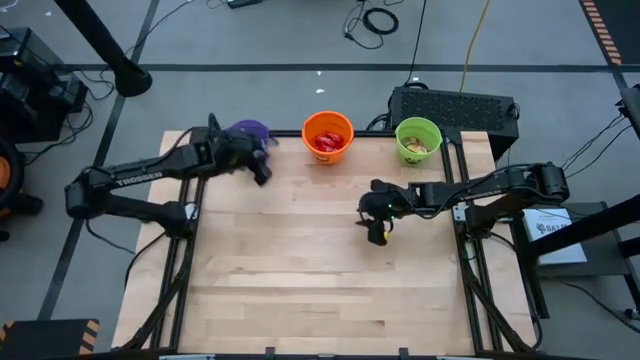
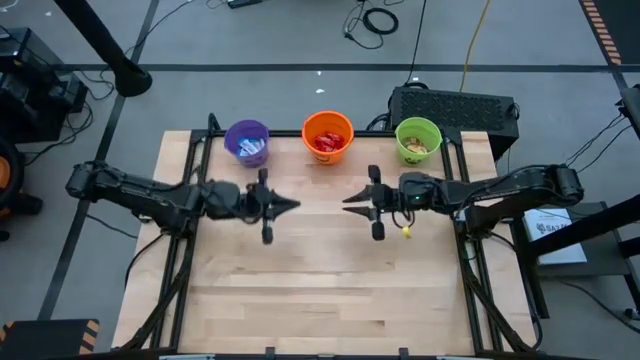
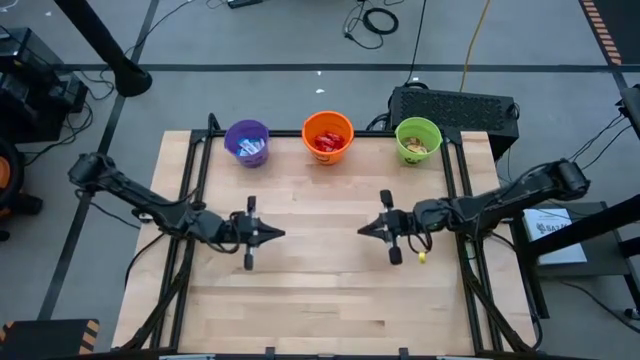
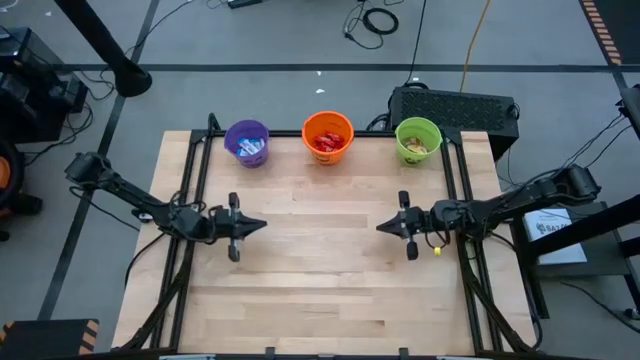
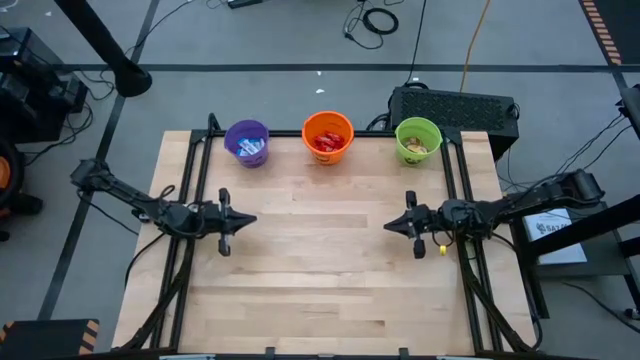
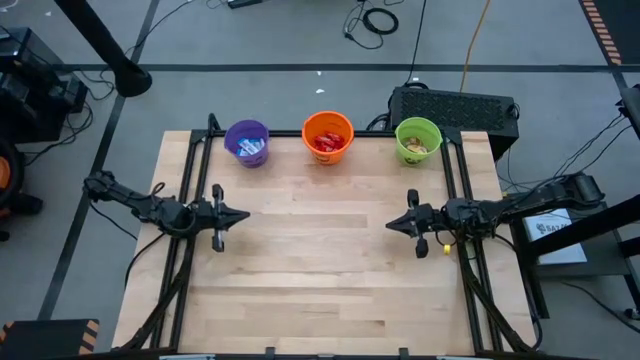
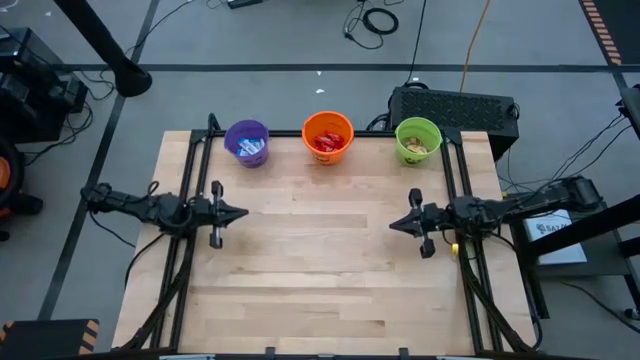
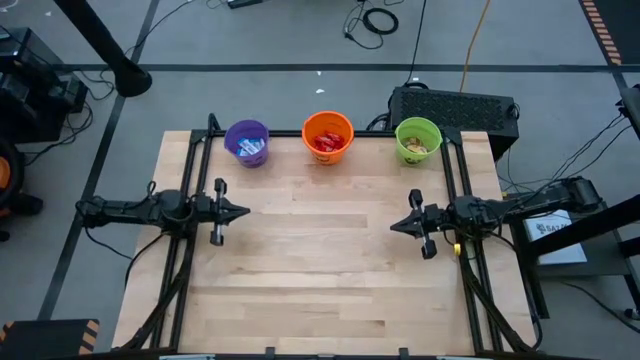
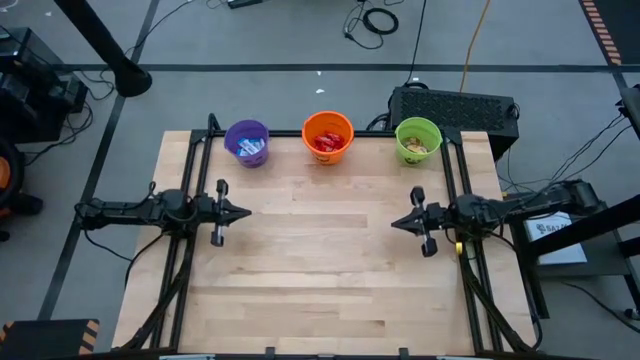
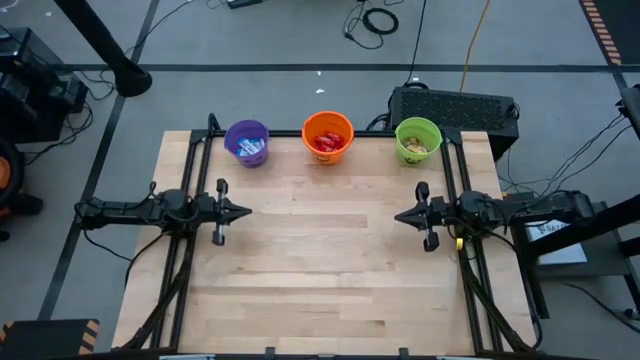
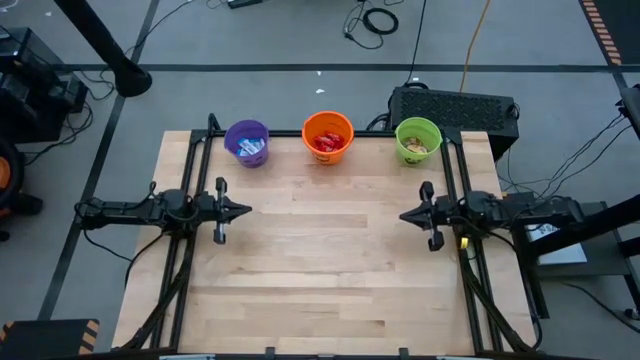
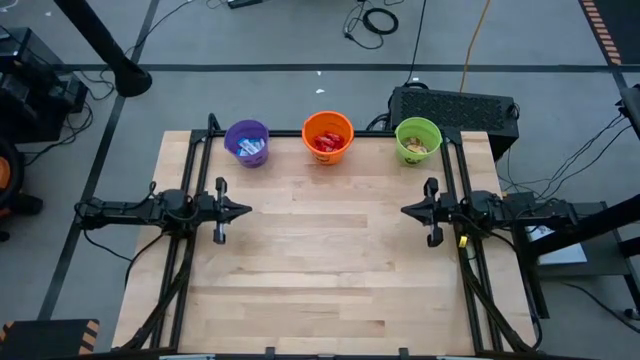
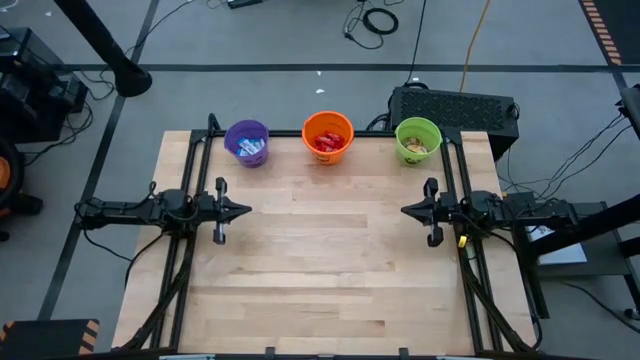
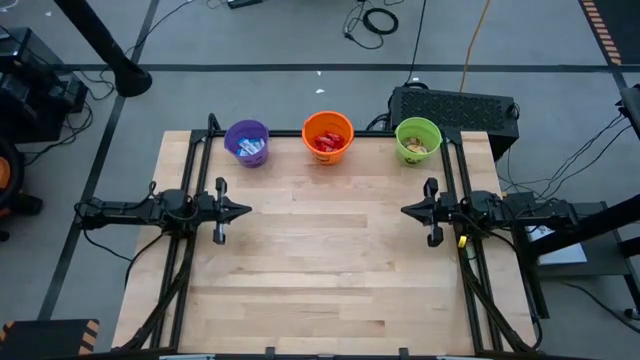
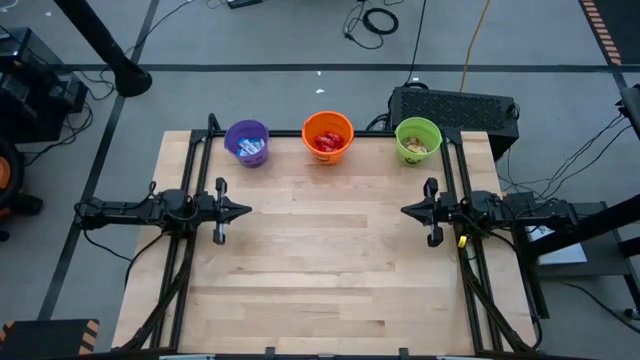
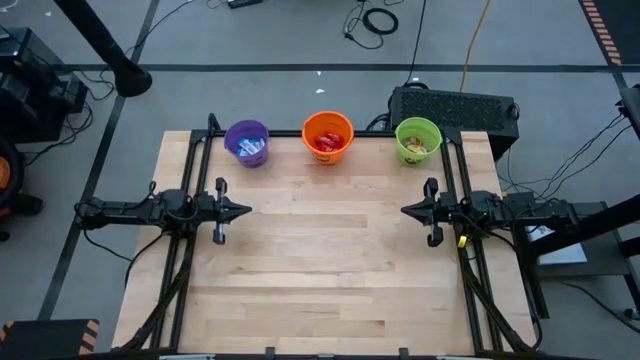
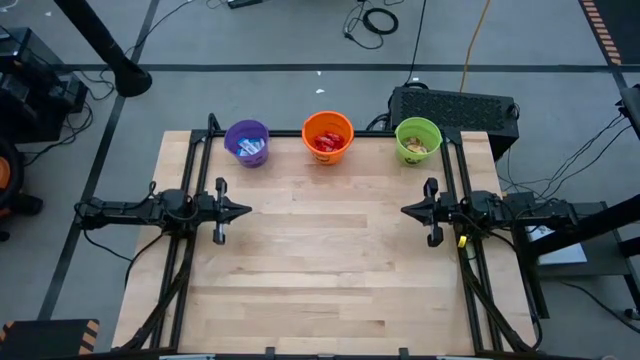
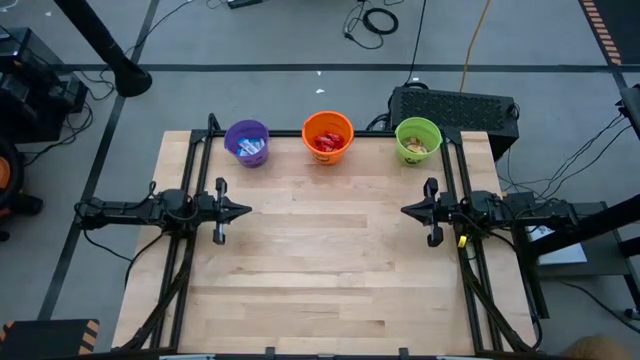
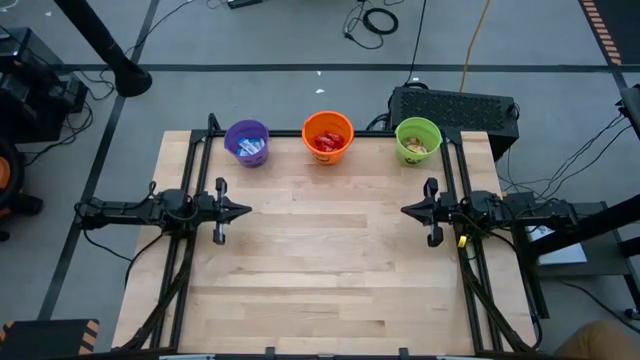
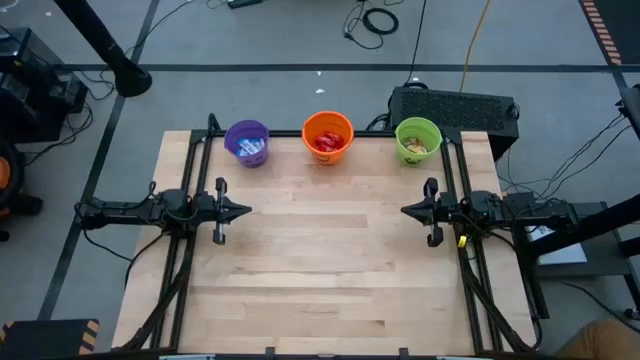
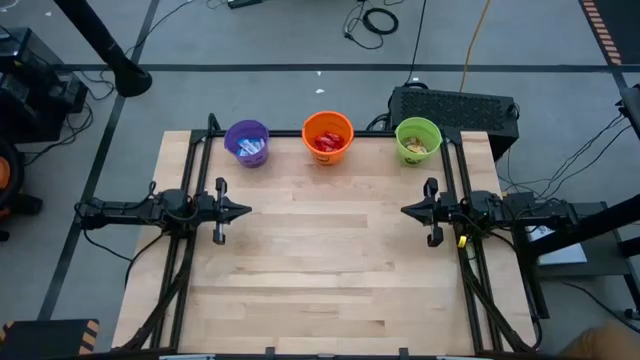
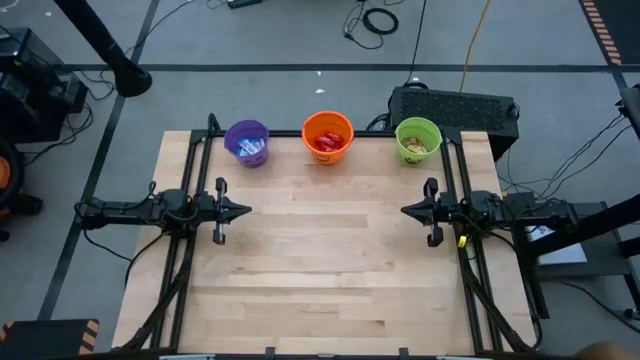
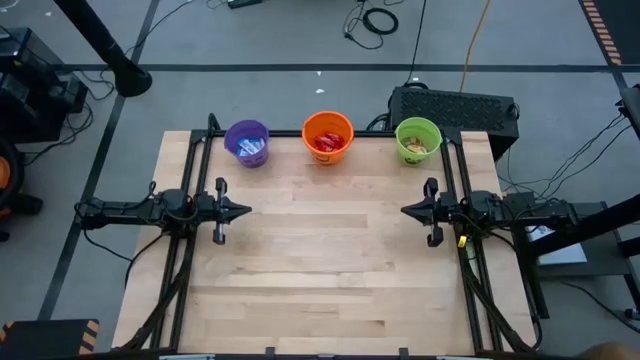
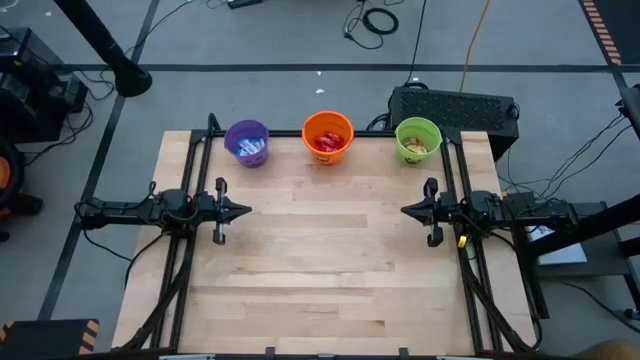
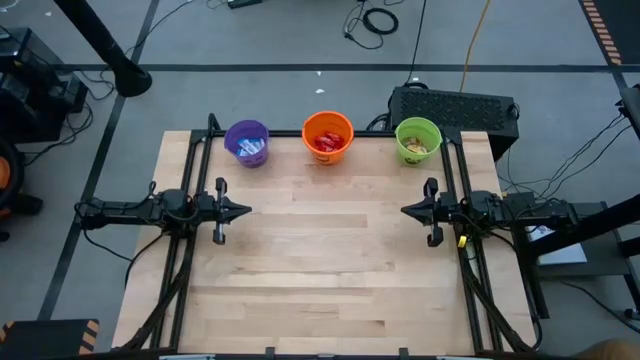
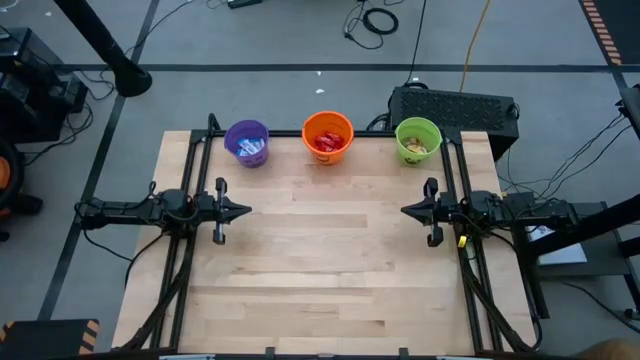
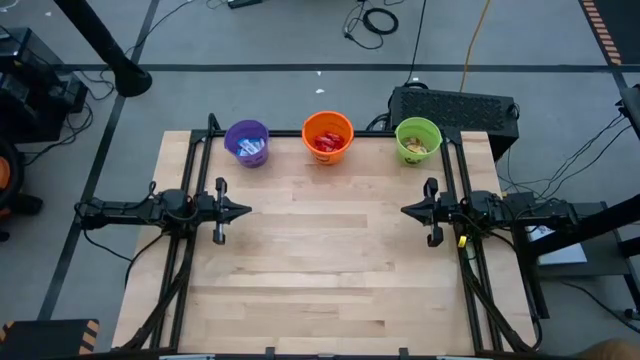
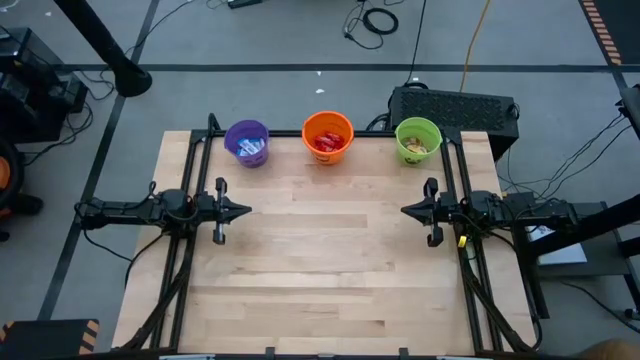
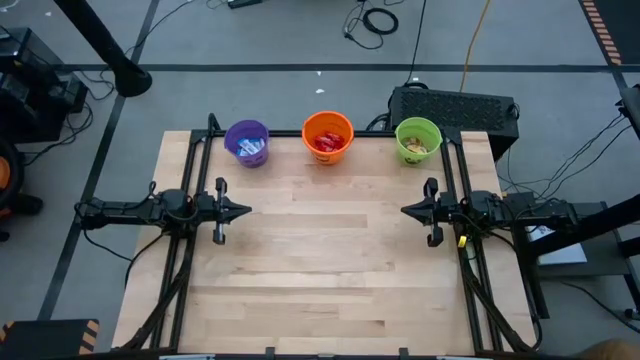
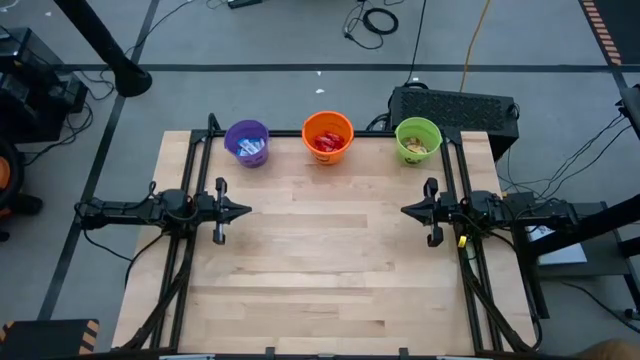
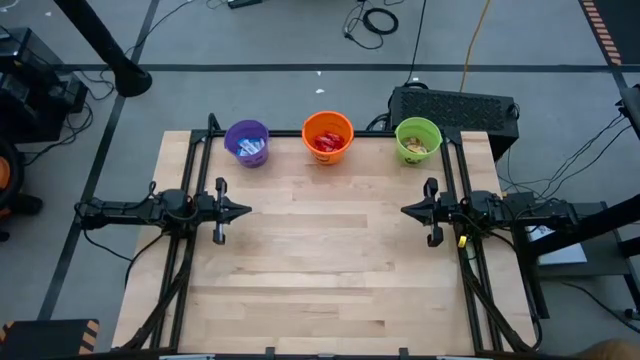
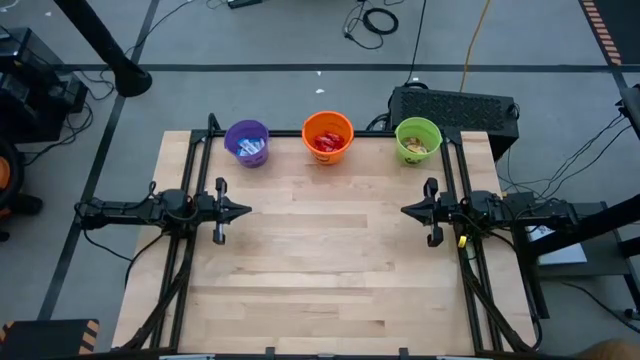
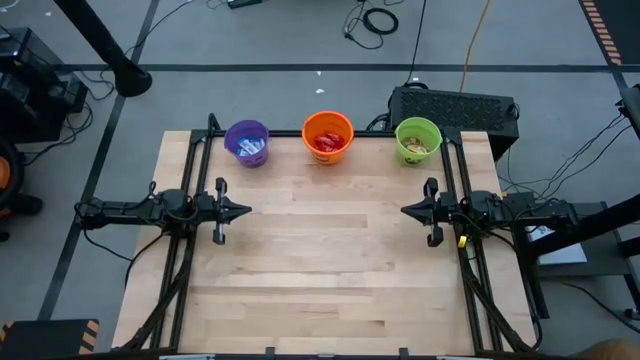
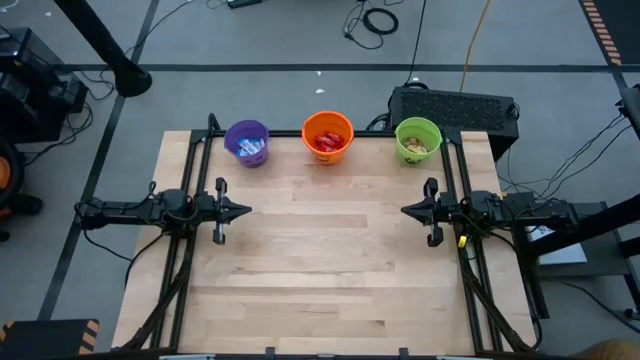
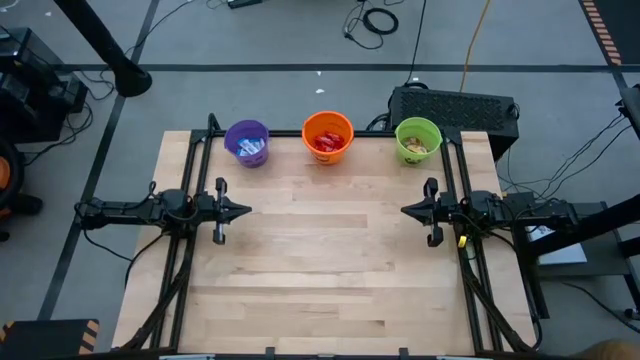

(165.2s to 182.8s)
Task: Sort candy by brand, put in halloween buckets
Return to Home Position

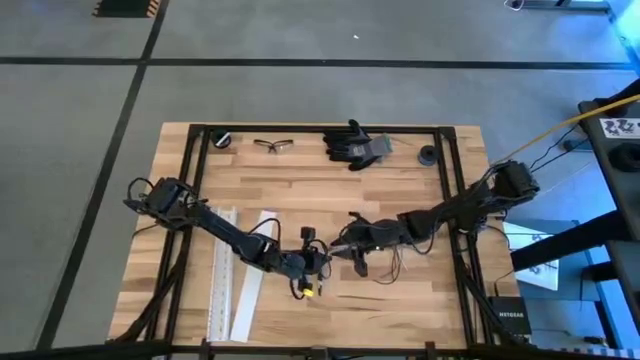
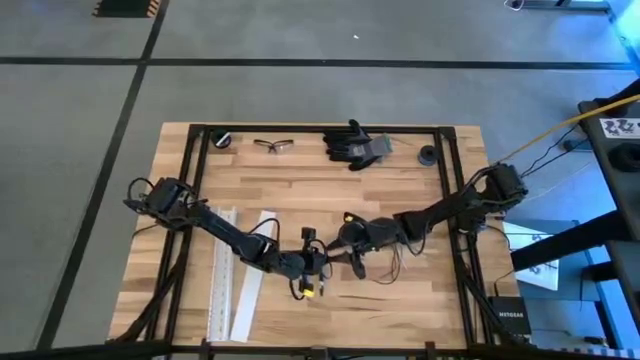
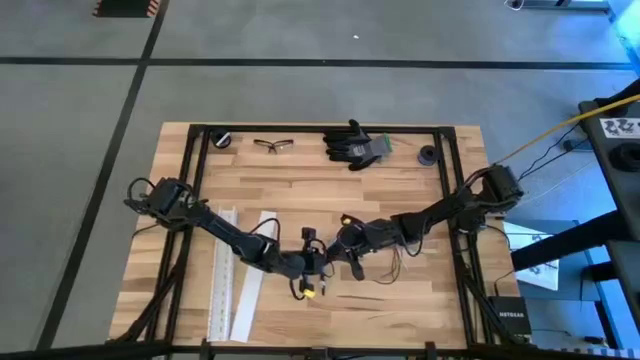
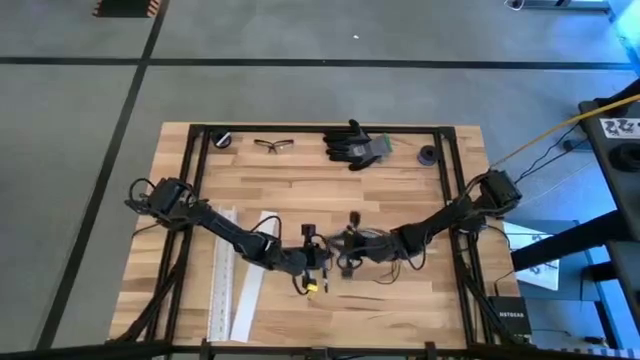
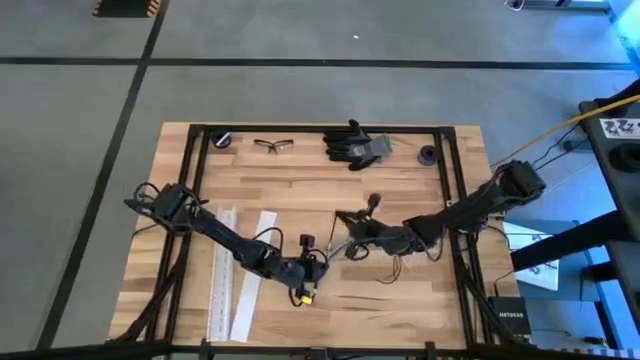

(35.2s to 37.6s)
Task: Ziptie cables
Wrap the black zip tie around the cable wires to form a loop
